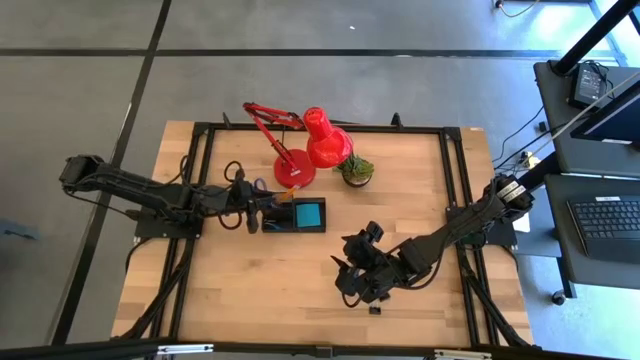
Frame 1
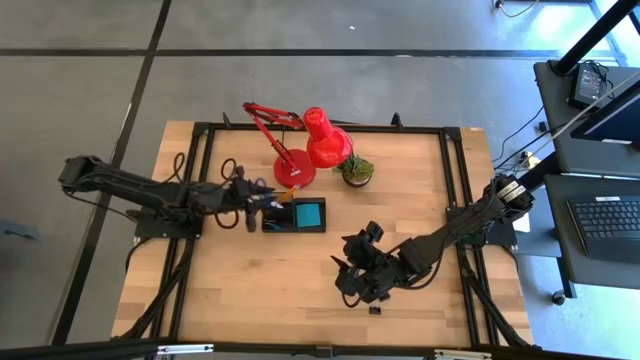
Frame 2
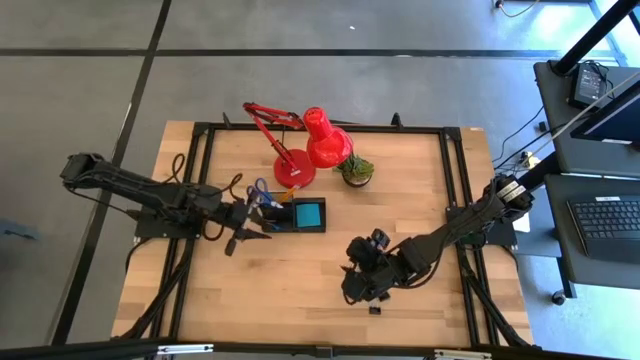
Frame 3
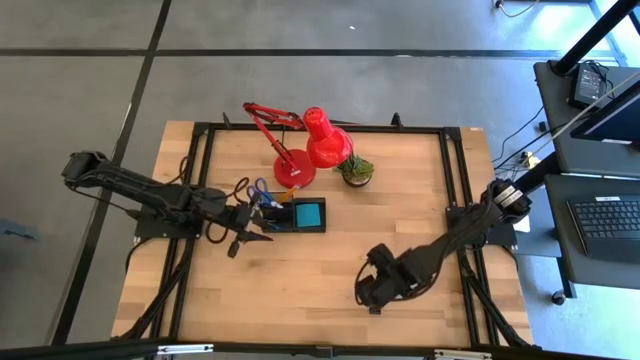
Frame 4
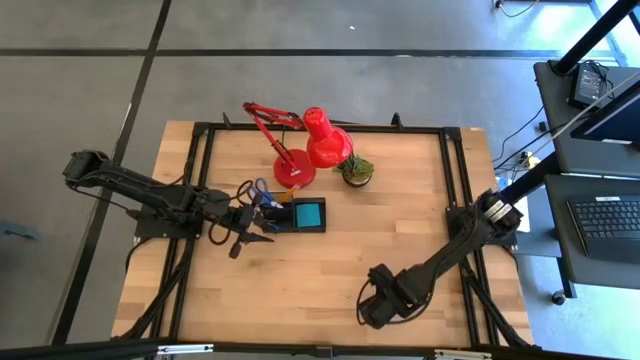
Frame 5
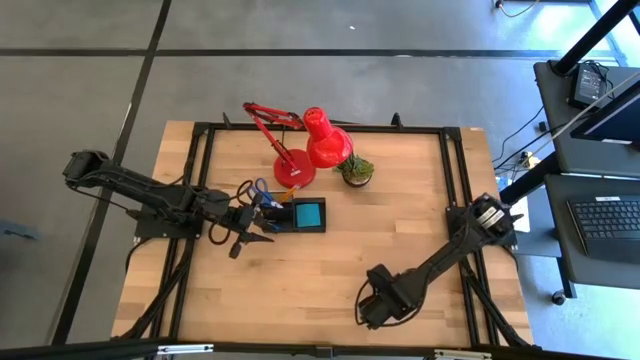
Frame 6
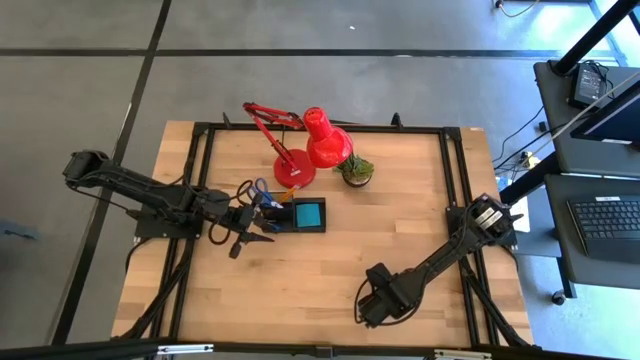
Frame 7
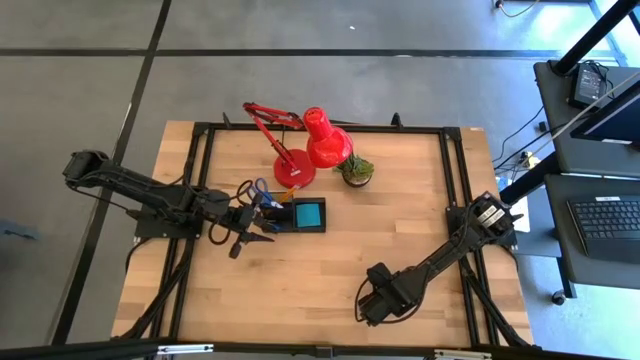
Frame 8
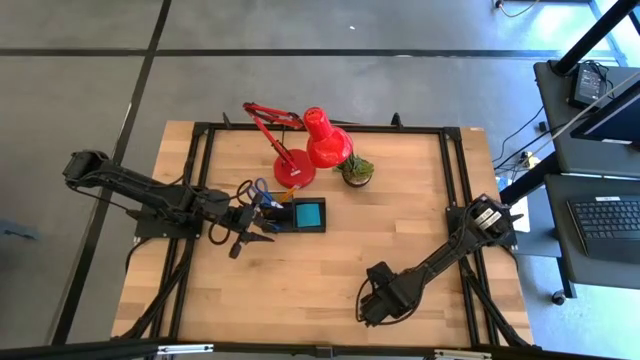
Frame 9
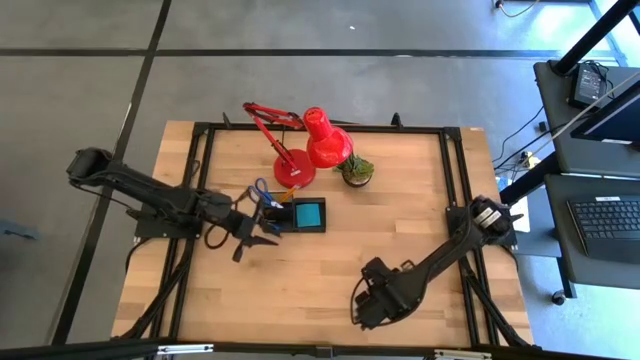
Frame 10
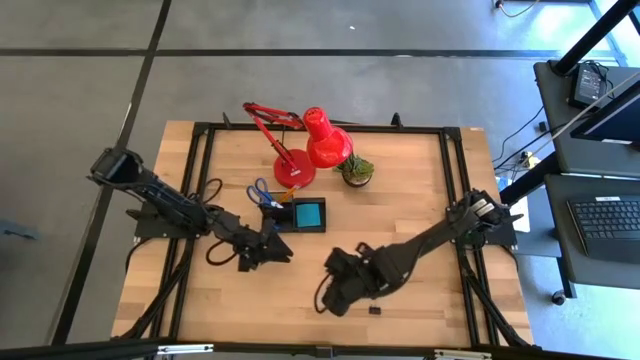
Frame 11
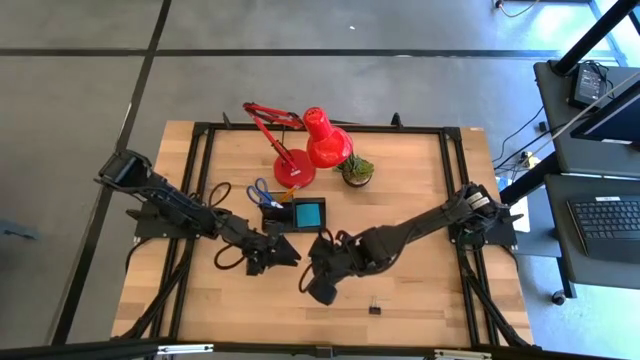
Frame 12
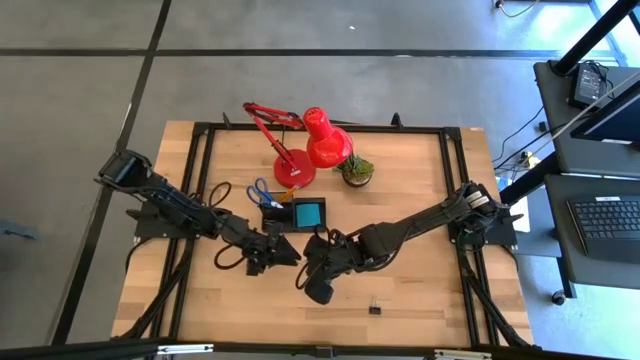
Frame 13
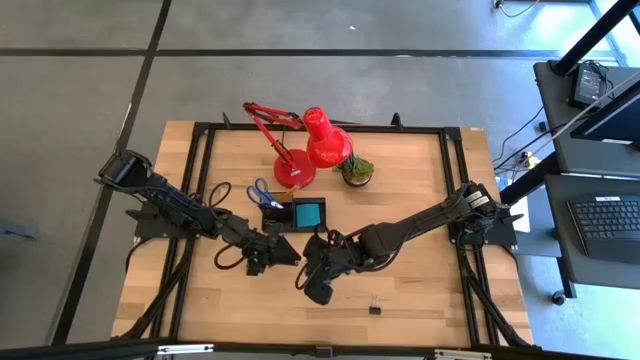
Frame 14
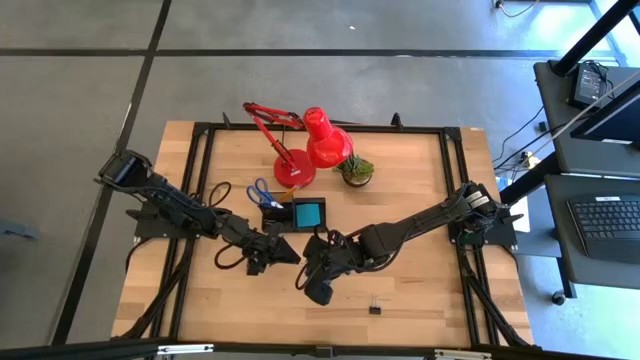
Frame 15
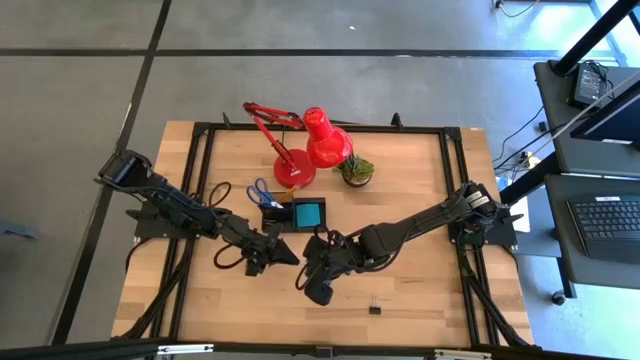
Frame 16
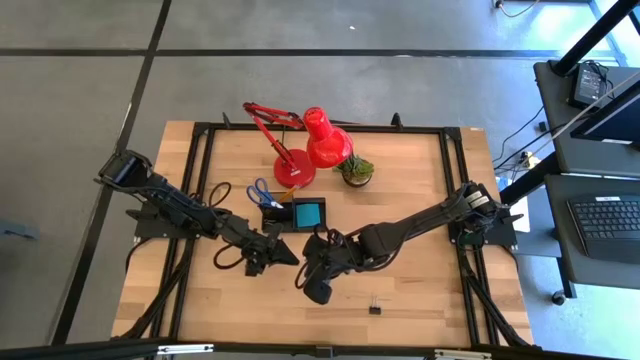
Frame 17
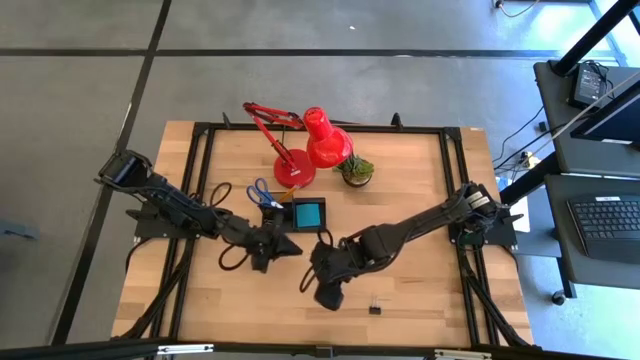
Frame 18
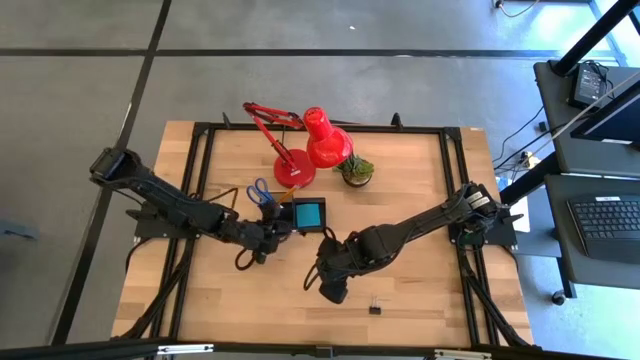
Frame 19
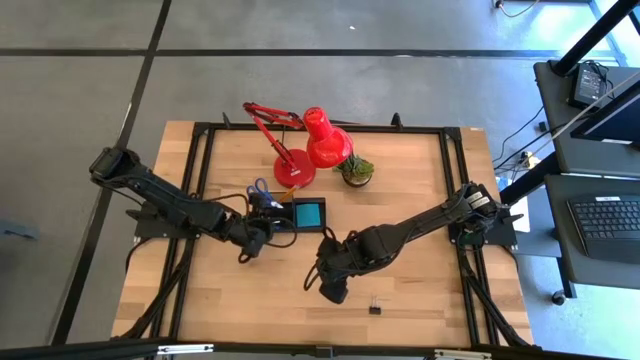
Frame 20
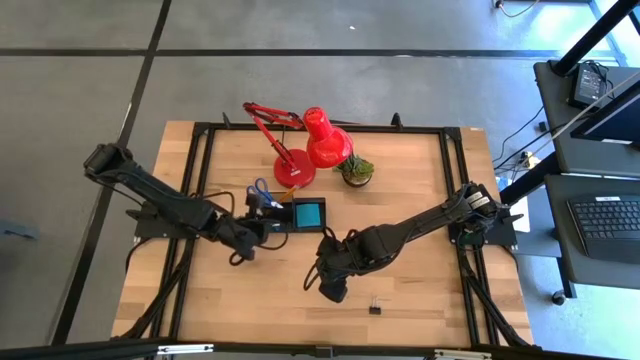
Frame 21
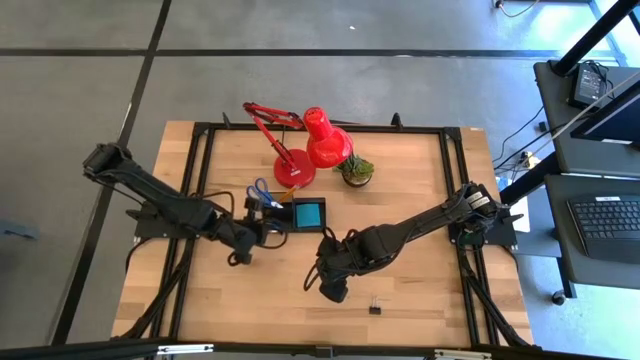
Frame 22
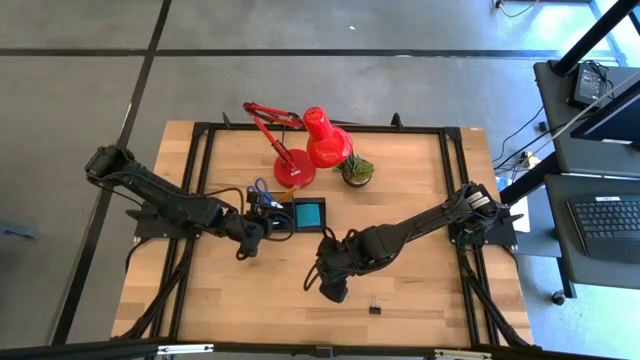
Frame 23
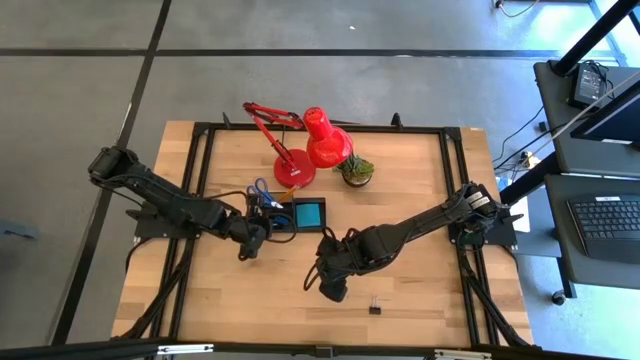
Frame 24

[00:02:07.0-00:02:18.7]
Task: Pick and place office supplies into organizer
Put the right black binder clip into the black desk organizer

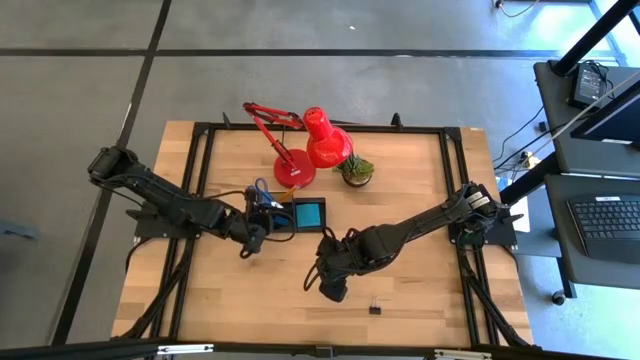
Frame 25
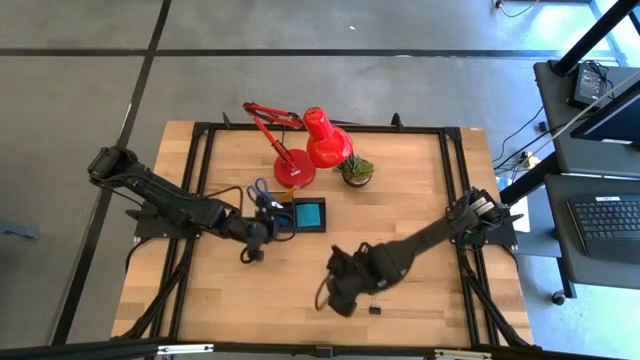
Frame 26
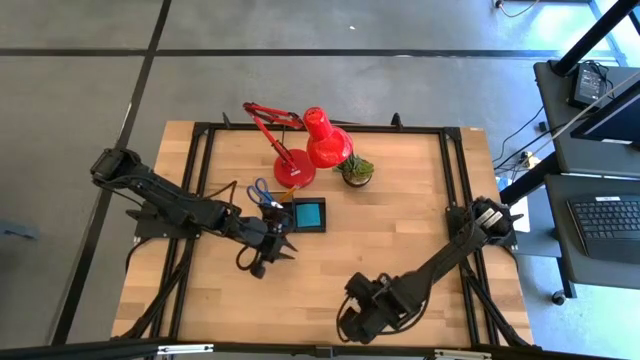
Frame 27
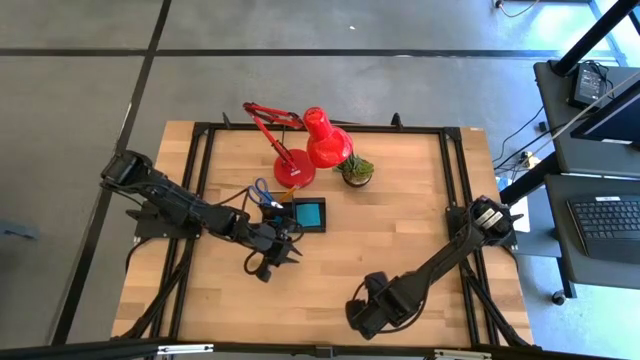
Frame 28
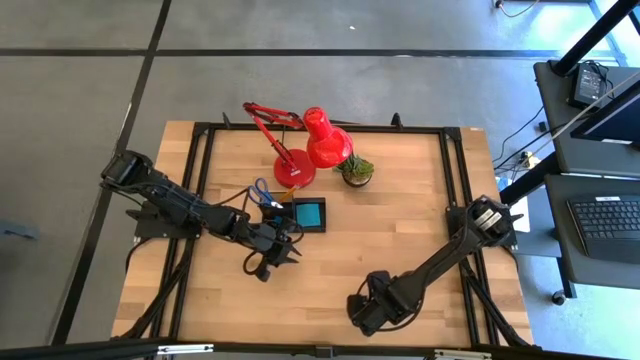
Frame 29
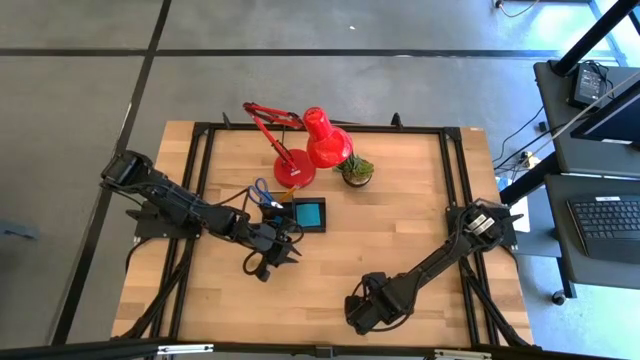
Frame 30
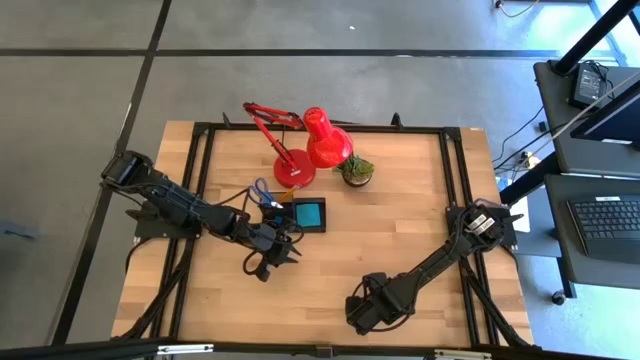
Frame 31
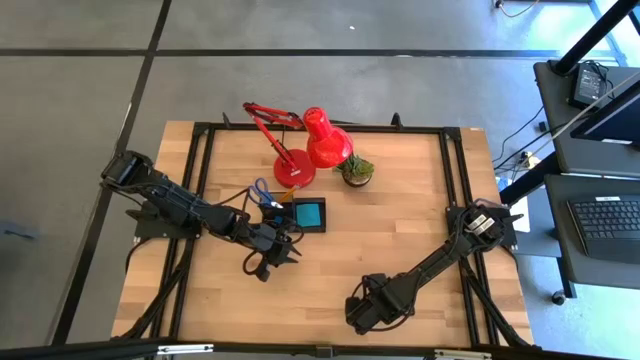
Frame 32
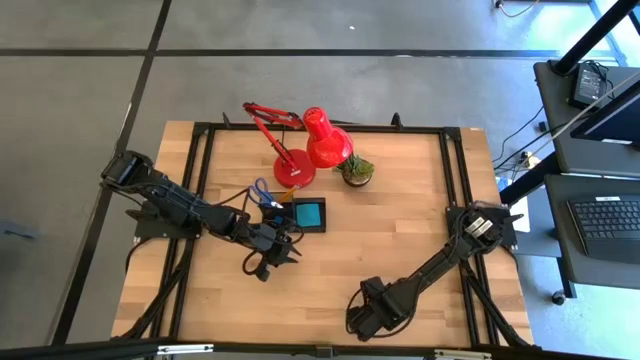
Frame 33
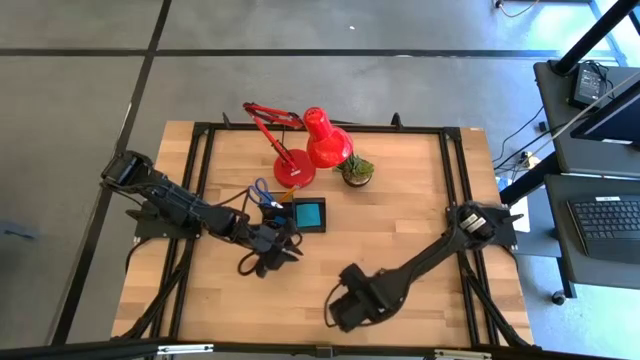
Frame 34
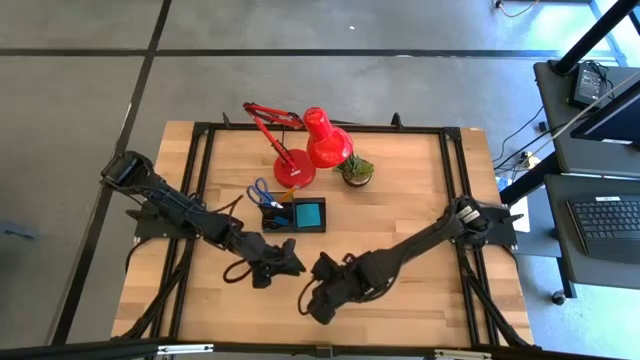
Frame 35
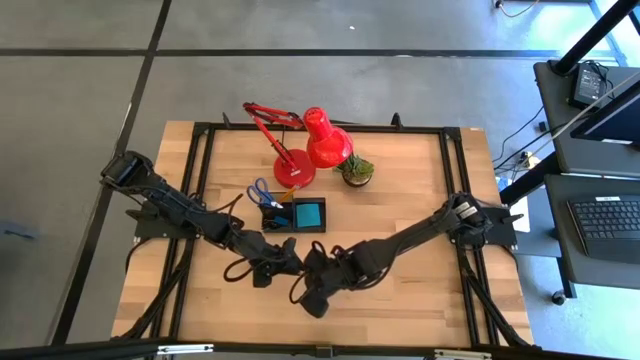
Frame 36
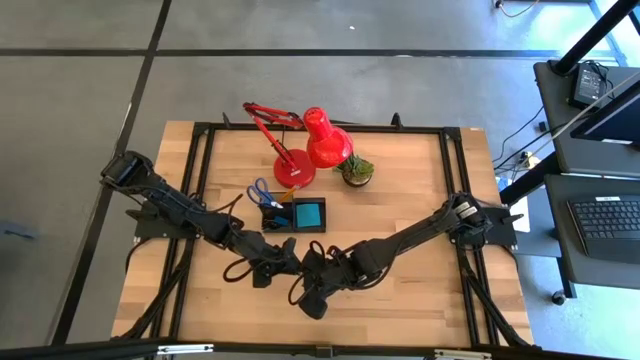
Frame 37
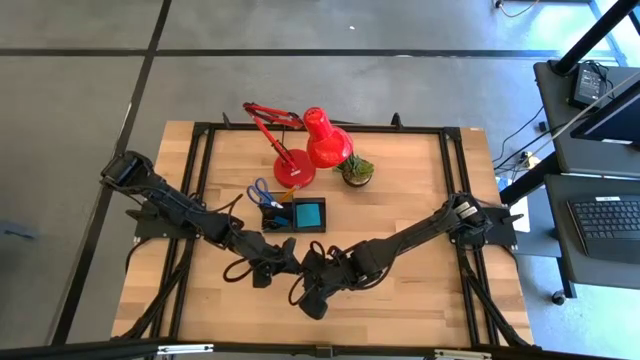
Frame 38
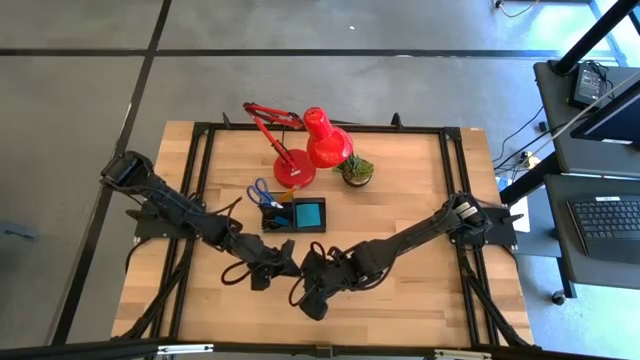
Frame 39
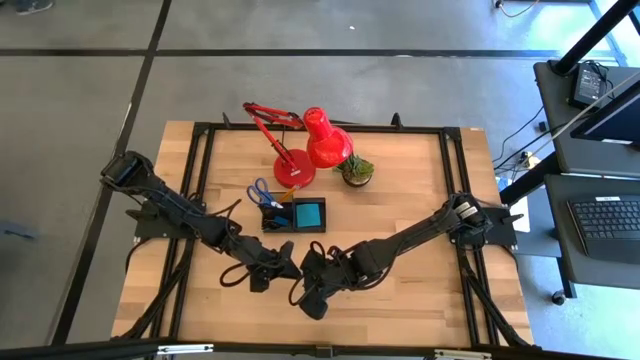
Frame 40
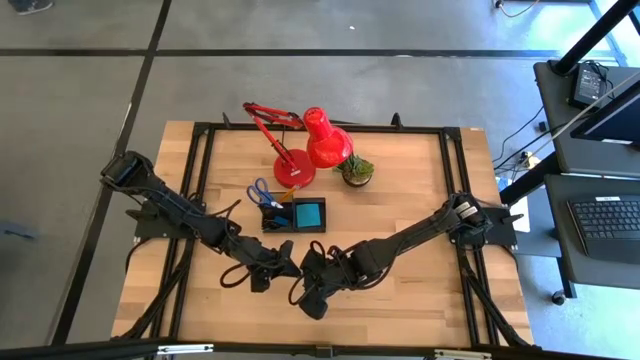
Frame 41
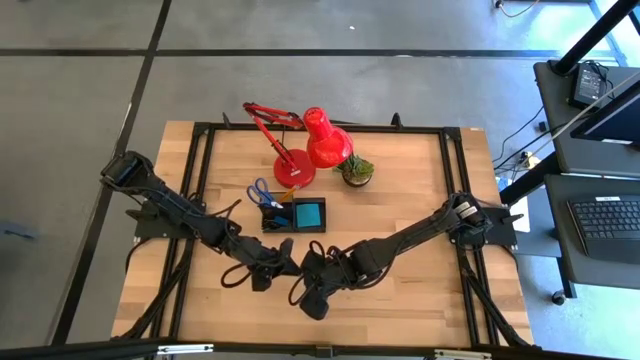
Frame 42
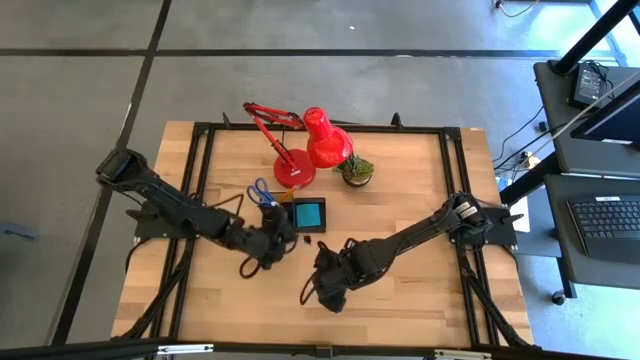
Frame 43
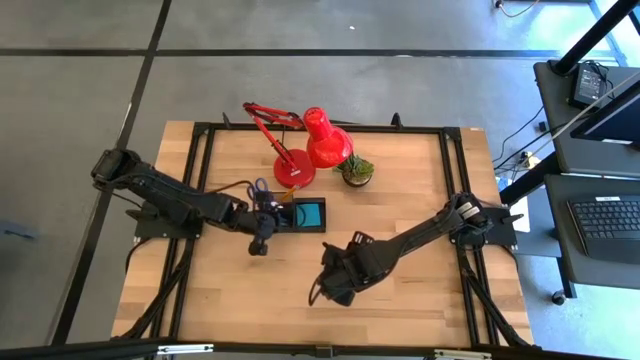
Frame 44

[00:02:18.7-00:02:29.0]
Put the black binder clip into the black desk organizer
